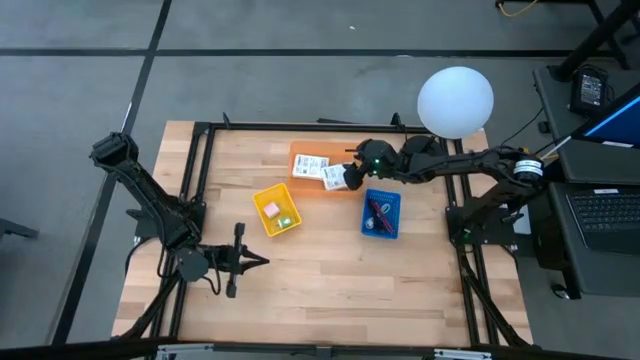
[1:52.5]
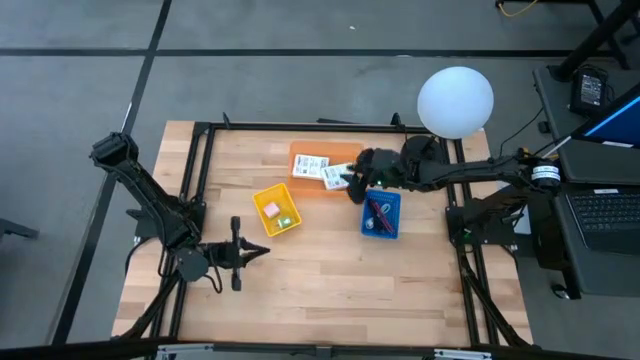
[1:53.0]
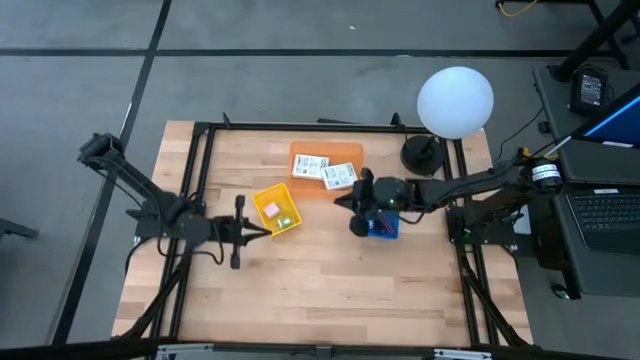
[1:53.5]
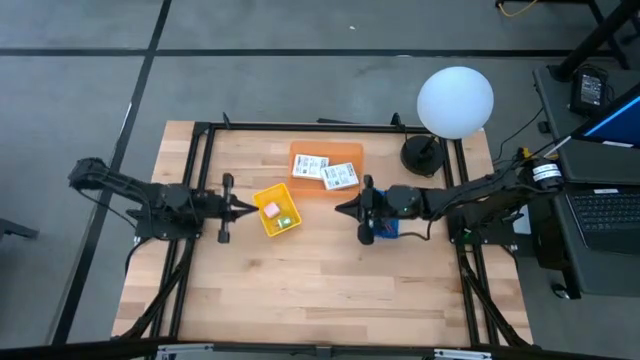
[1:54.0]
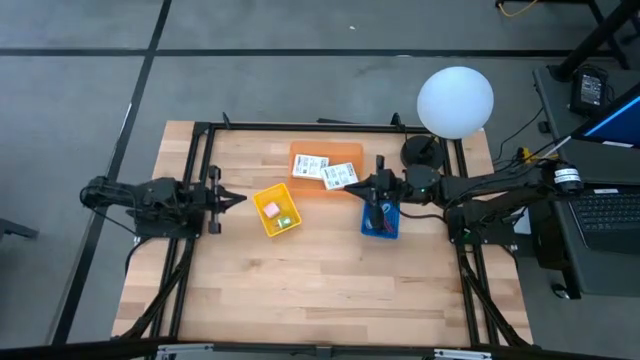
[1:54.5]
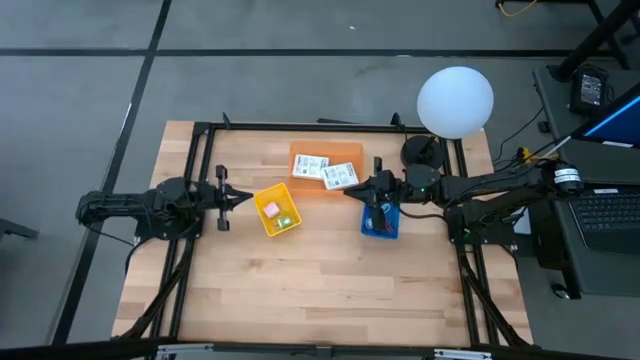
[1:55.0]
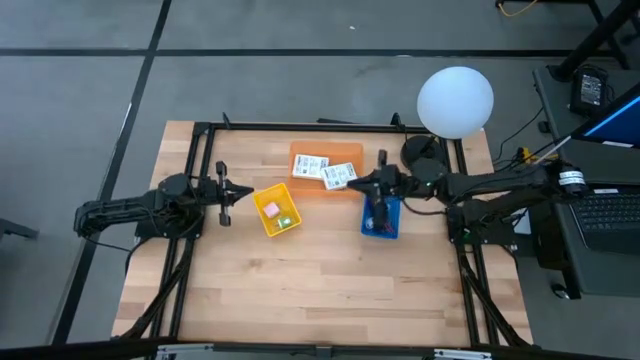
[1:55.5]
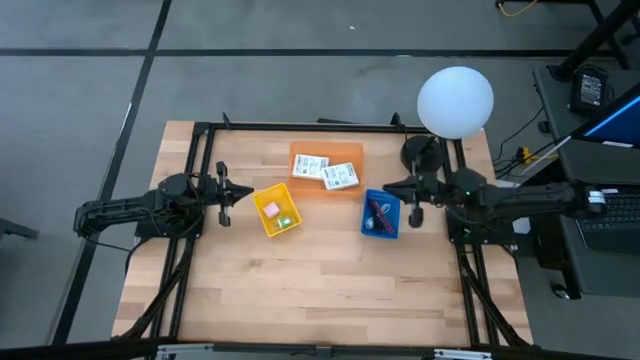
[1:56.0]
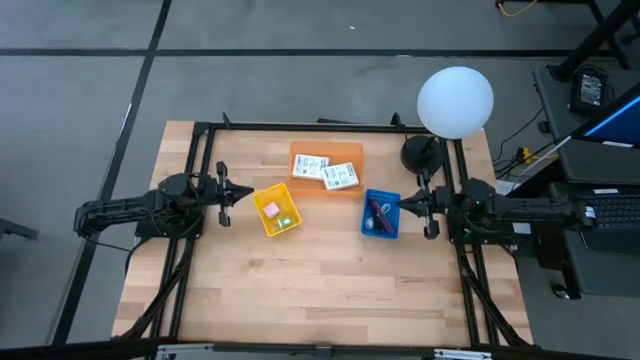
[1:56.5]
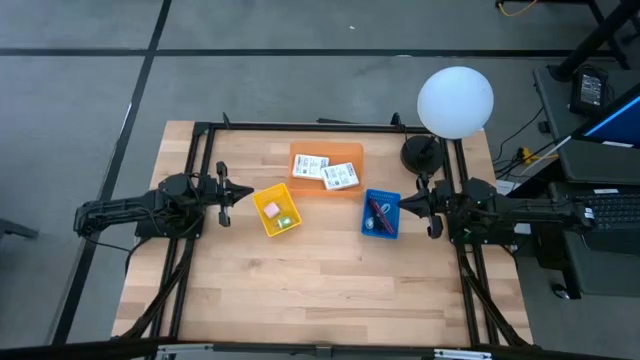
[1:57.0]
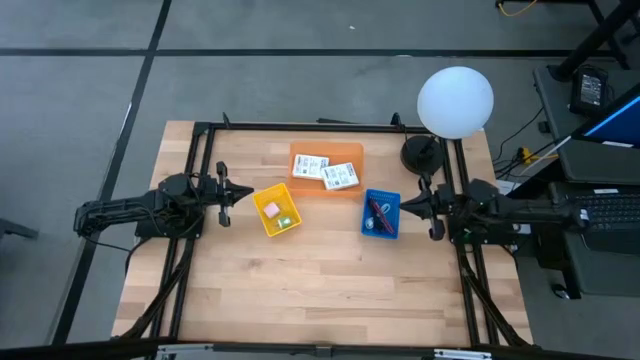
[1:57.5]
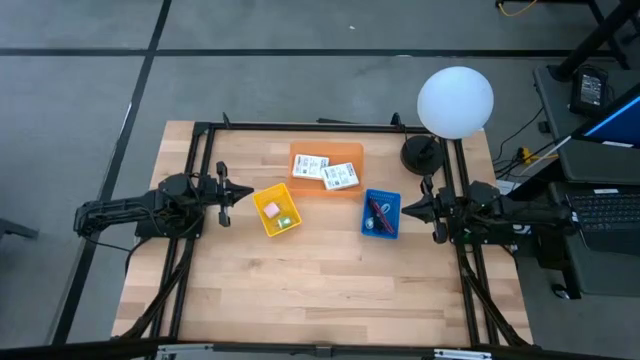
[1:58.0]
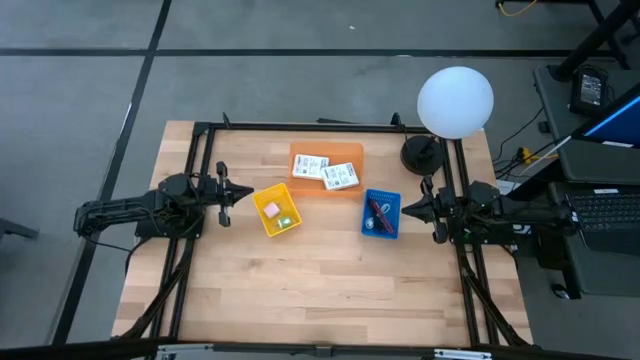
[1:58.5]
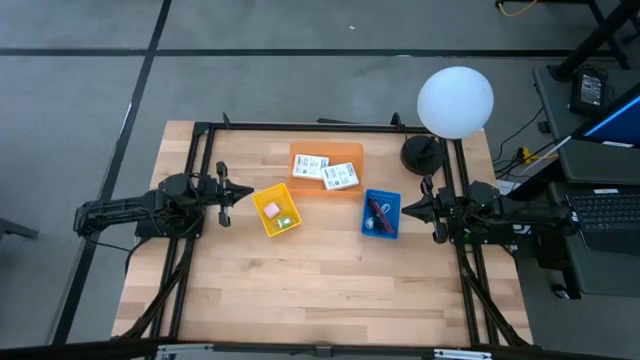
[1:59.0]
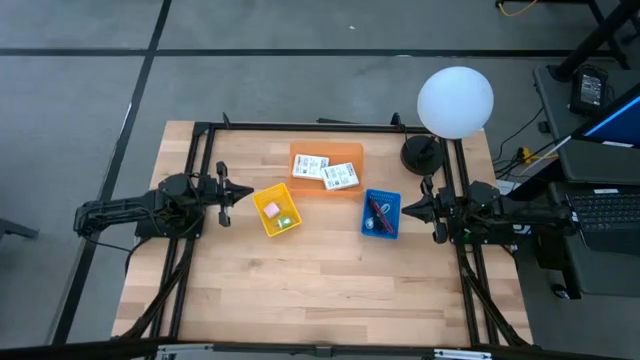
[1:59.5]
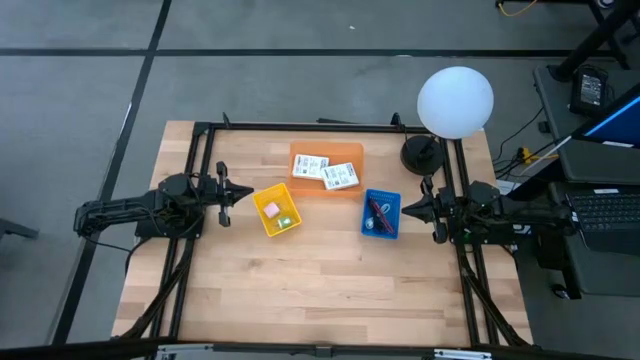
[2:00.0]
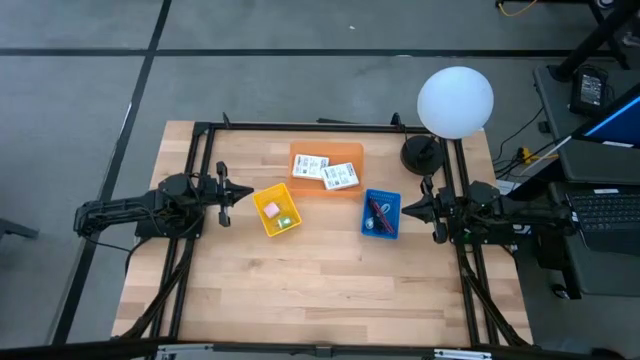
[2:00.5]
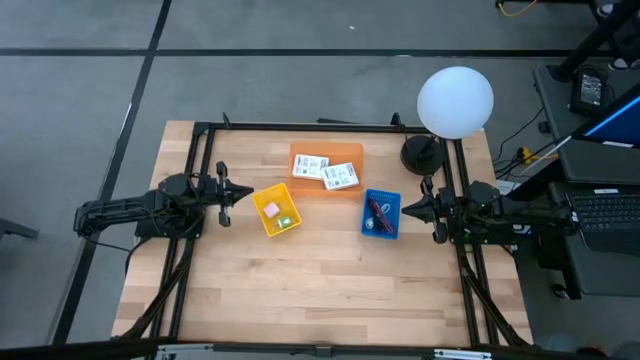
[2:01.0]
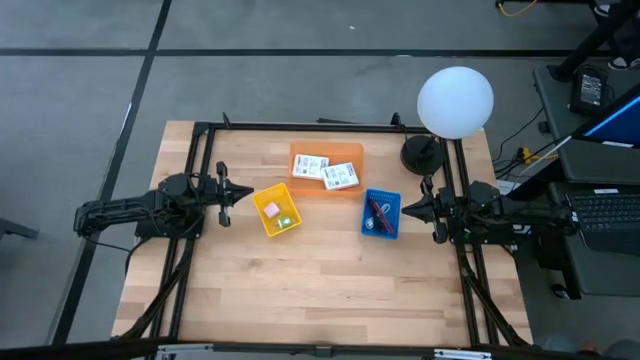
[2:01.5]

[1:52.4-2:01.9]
Task: Pick and place items into bin
Return to Home Position

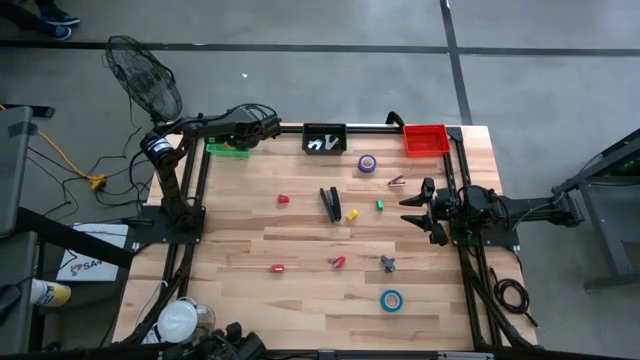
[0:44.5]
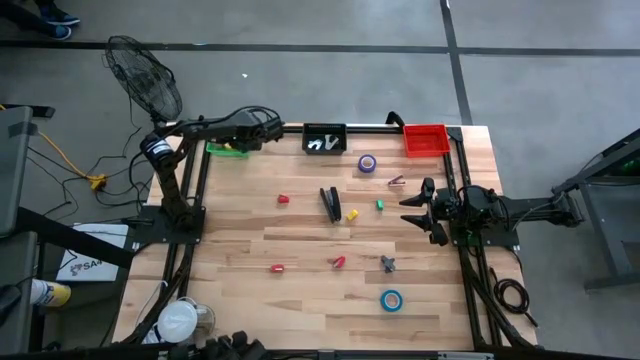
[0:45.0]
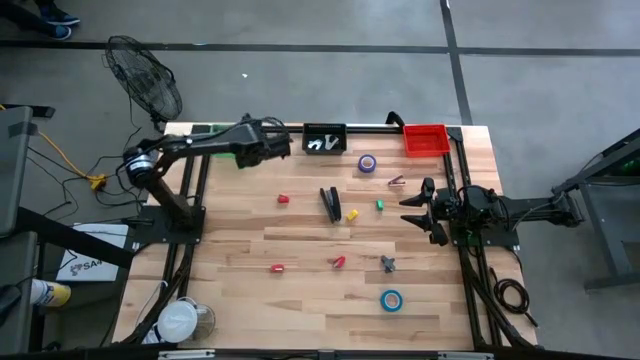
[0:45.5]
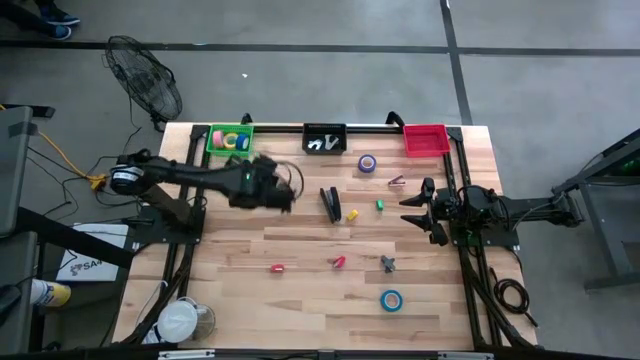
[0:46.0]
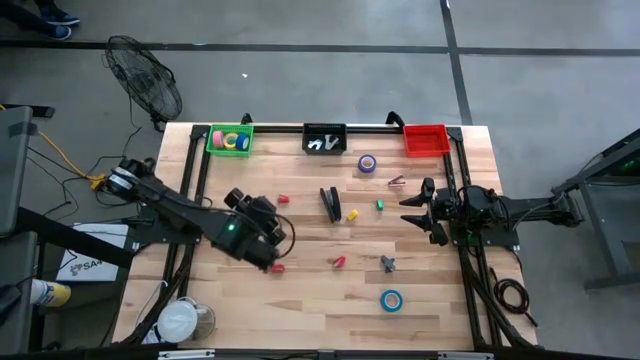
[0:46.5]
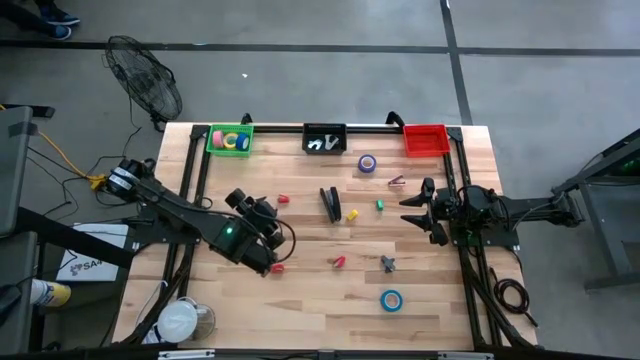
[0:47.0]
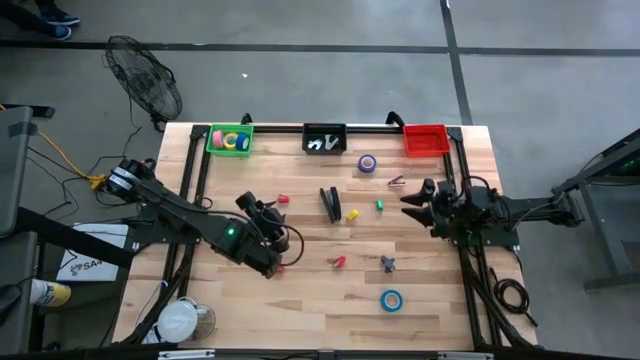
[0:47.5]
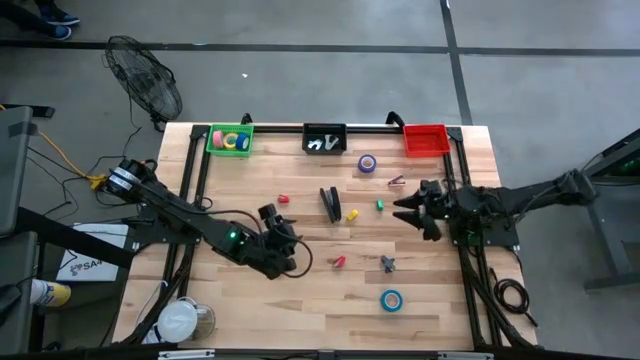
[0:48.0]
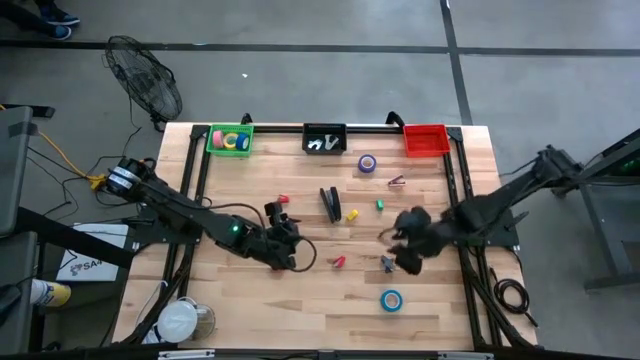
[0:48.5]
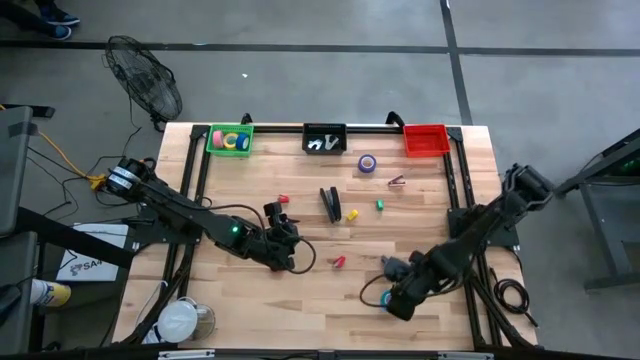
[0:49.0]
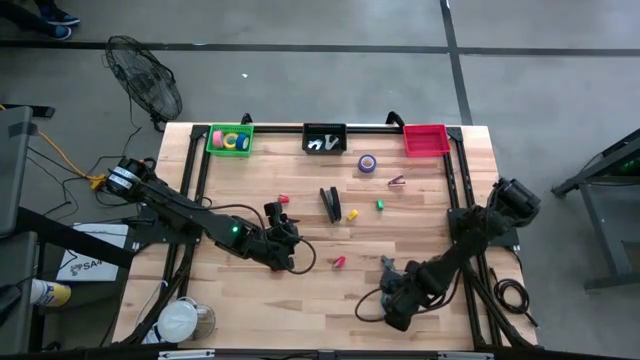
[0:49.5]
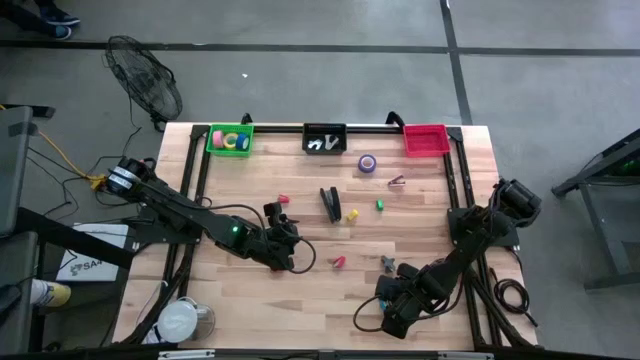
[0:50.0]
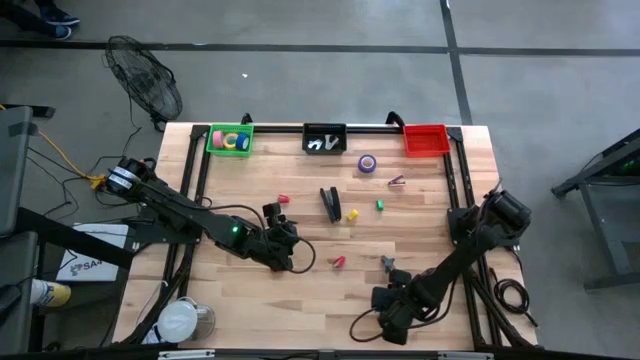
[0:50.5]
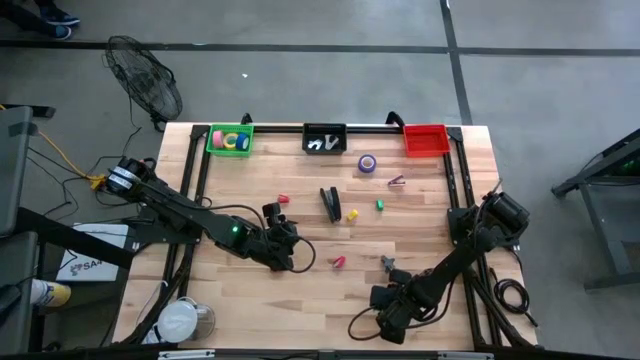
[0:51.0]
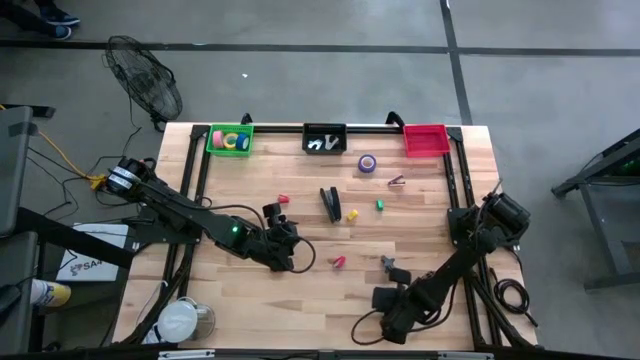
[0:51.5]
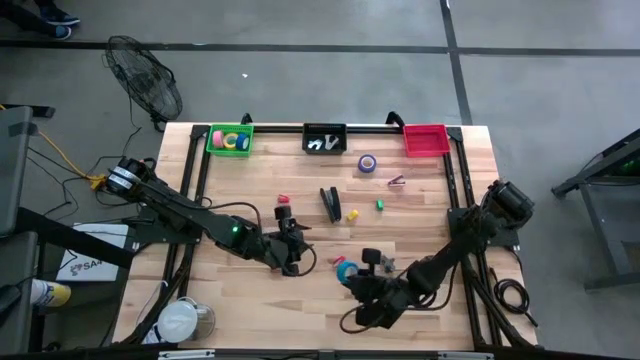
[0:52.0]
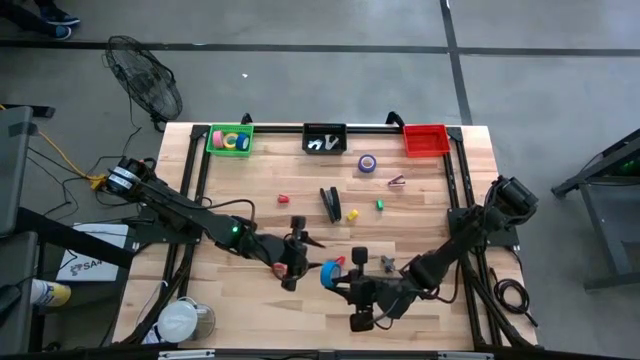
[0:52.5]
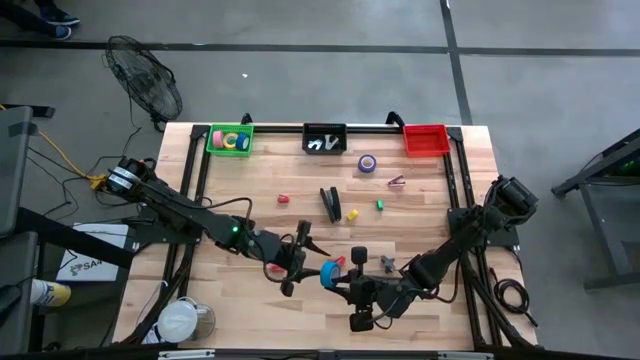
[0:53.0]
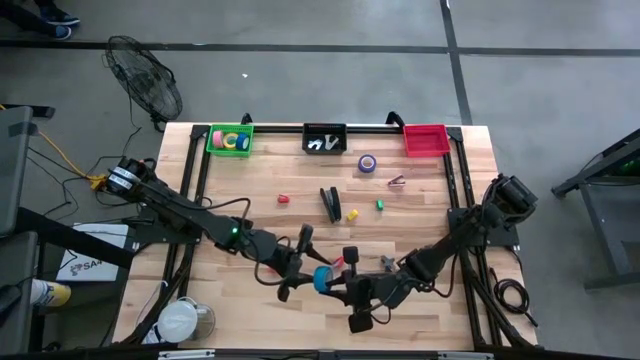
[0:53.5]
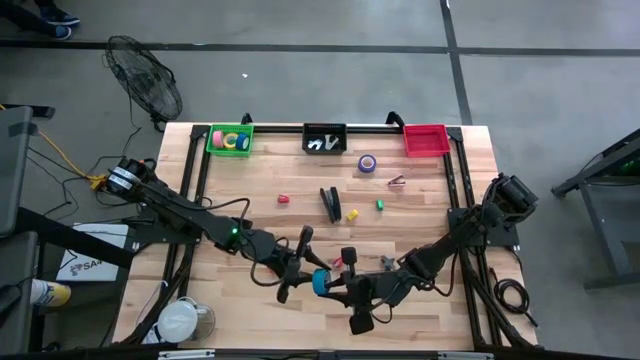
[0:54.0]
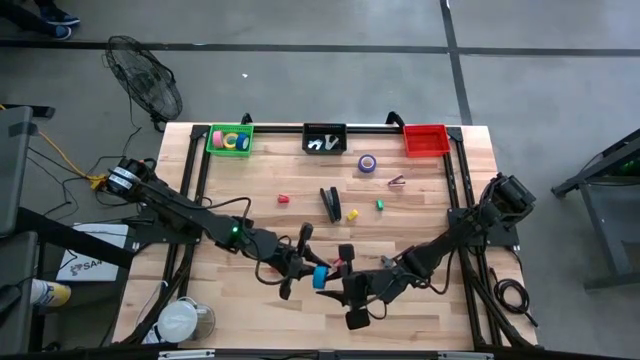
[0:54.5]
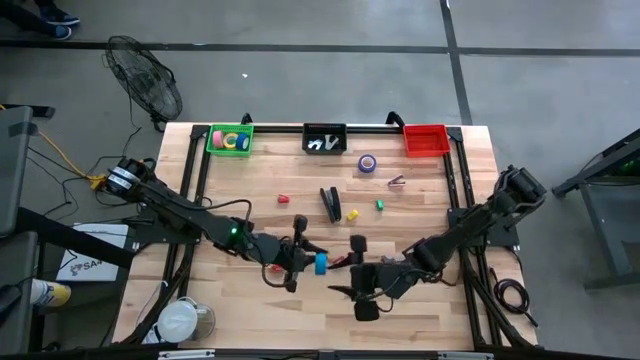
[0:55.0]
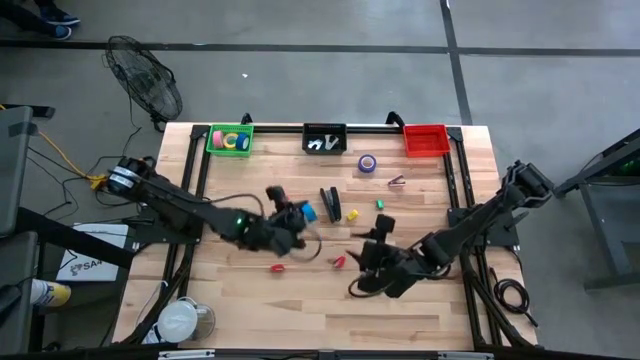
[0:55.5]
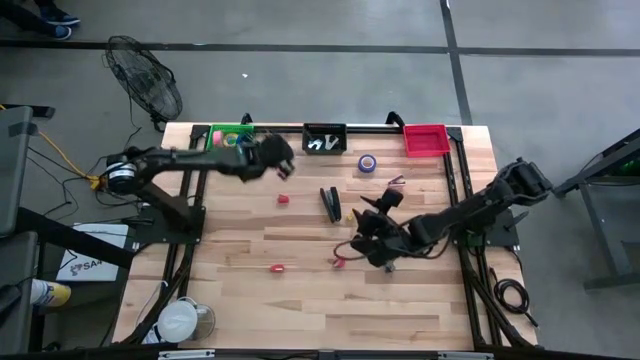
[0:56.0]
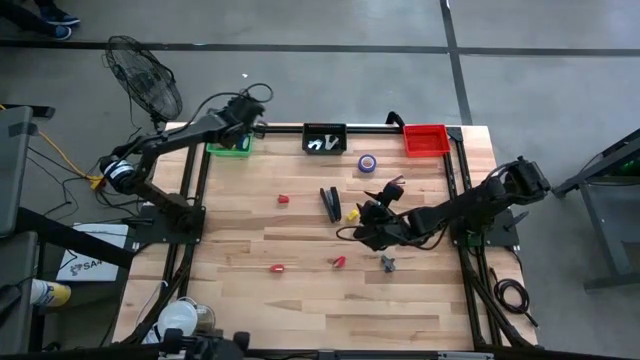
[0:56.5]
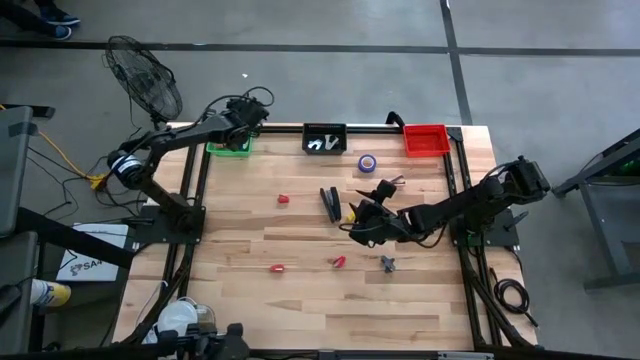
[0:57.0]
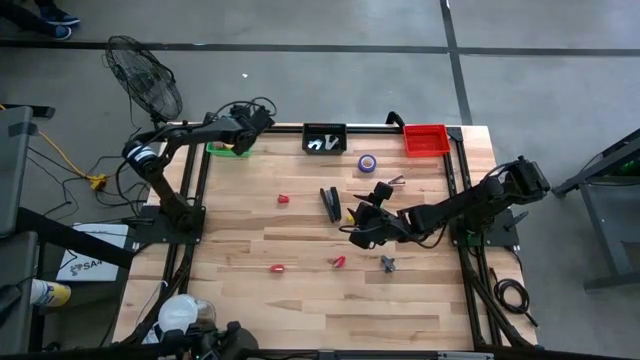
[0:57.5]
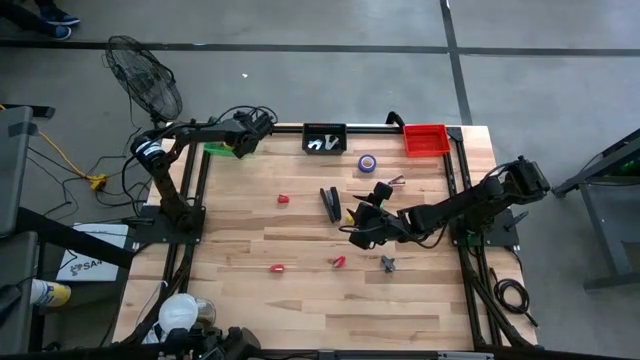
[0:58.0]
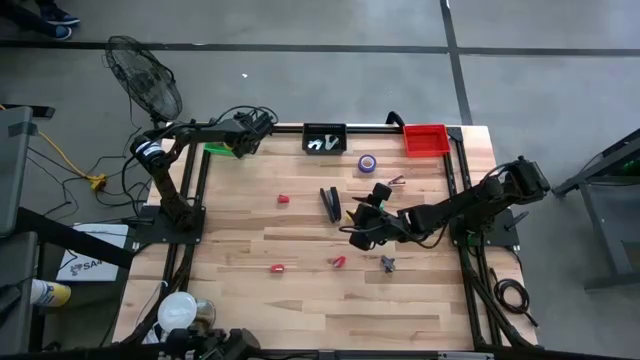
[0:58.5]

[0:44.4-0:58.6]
Task: Pick and place Stapler, Stapler remover, tape
Put the light blue tape in the green bin
